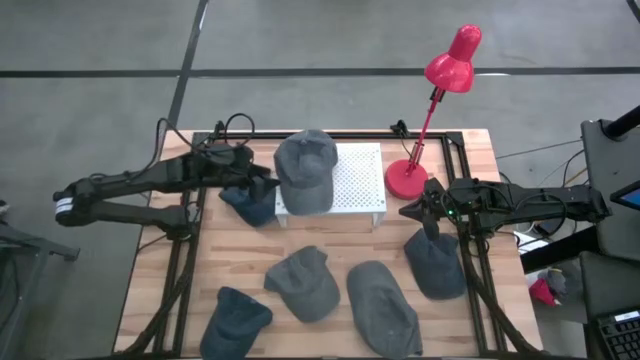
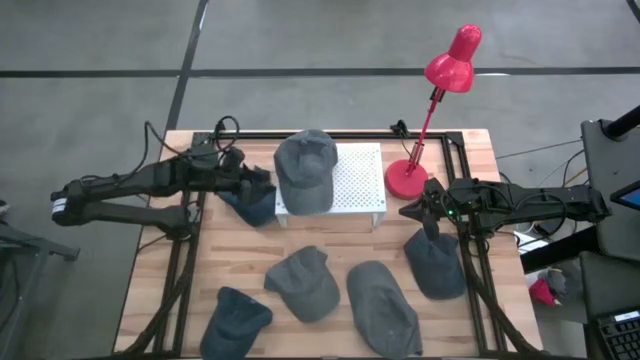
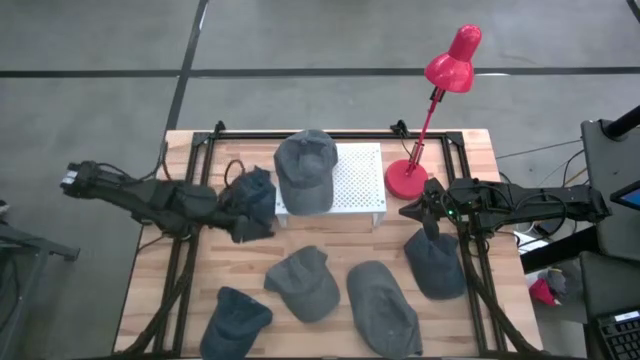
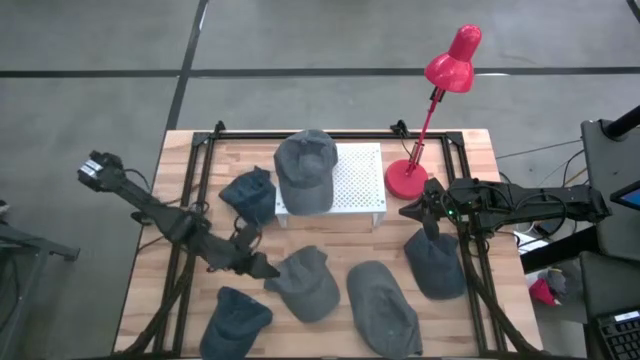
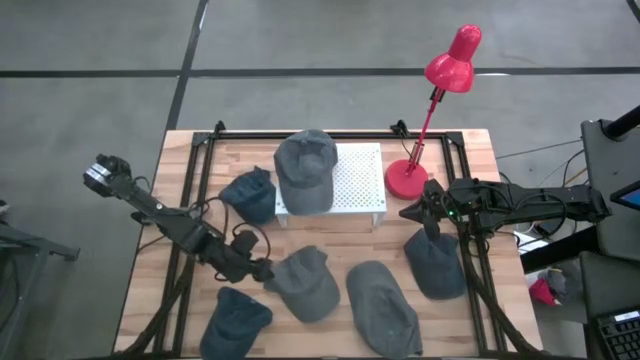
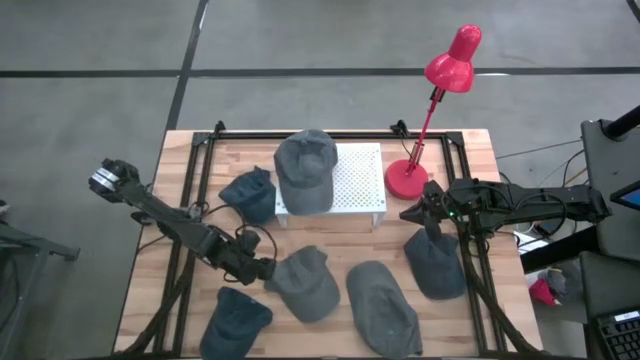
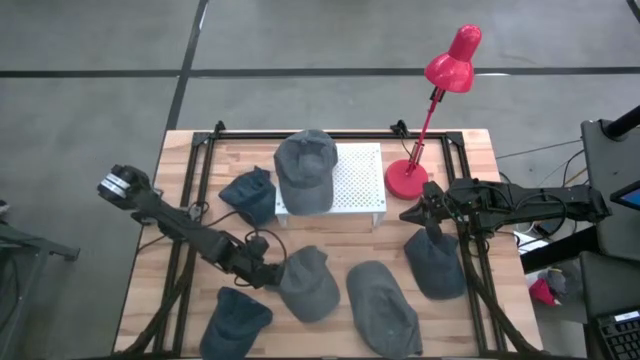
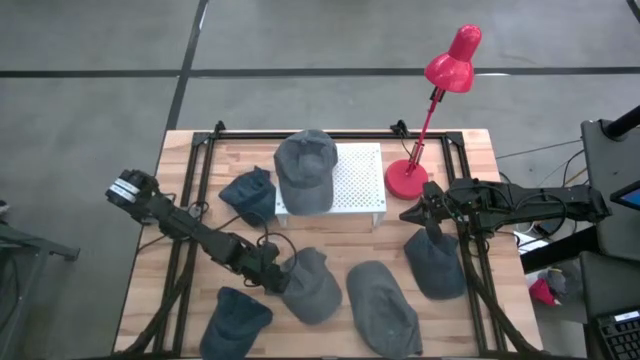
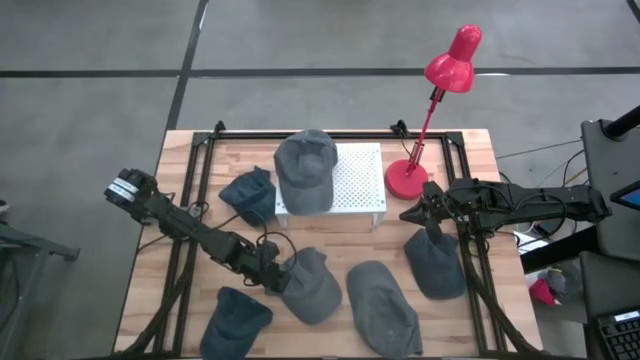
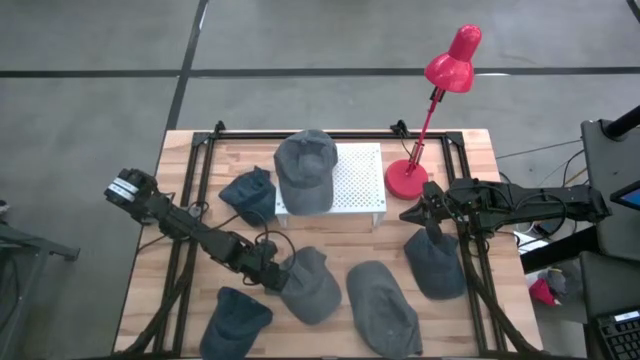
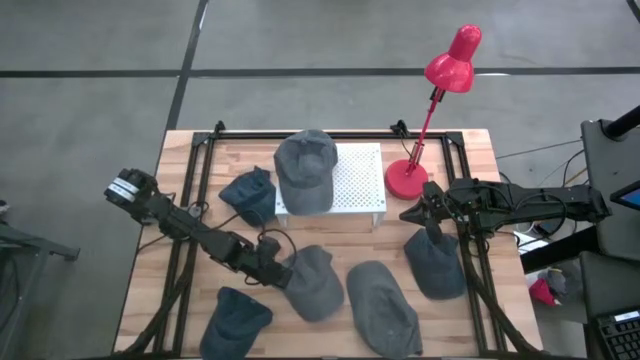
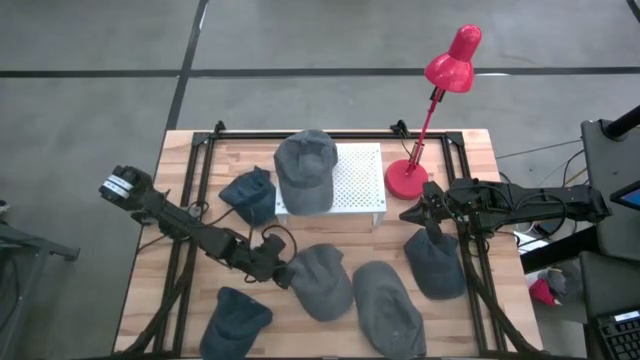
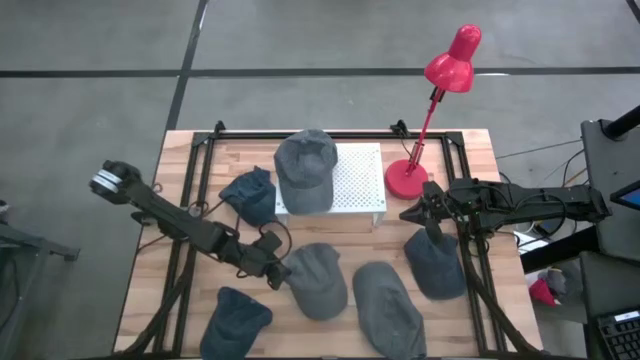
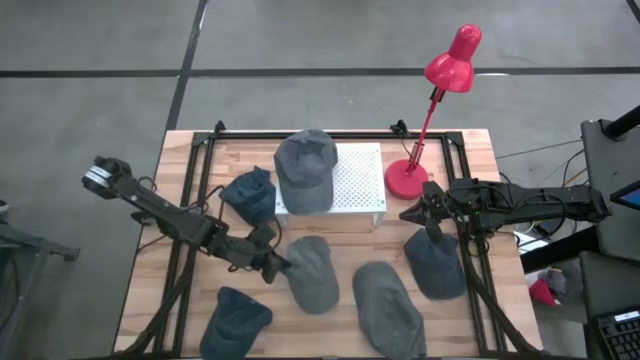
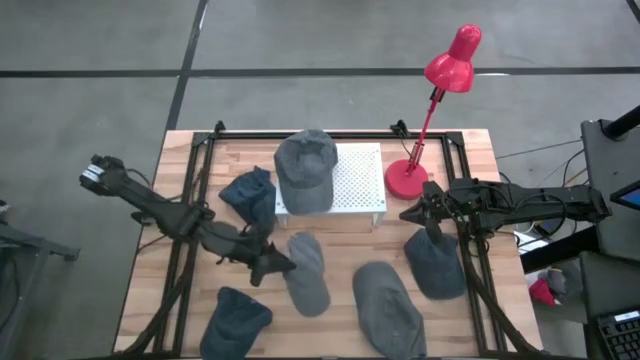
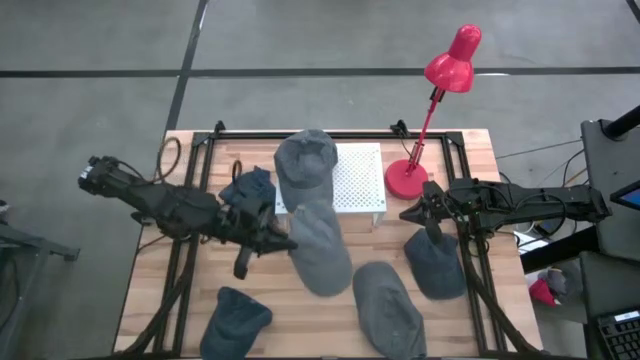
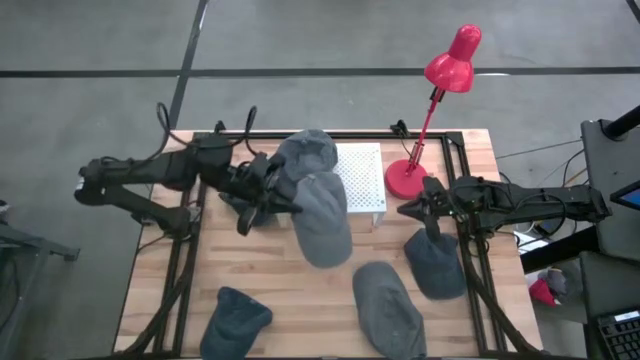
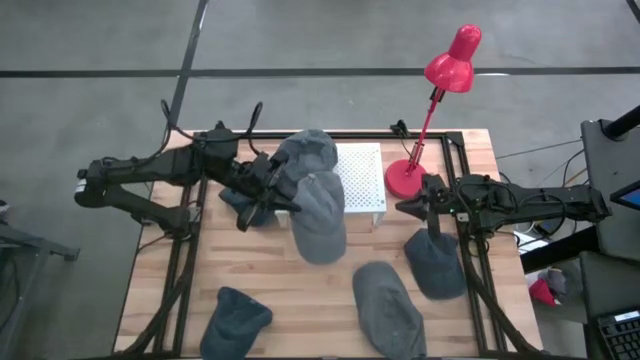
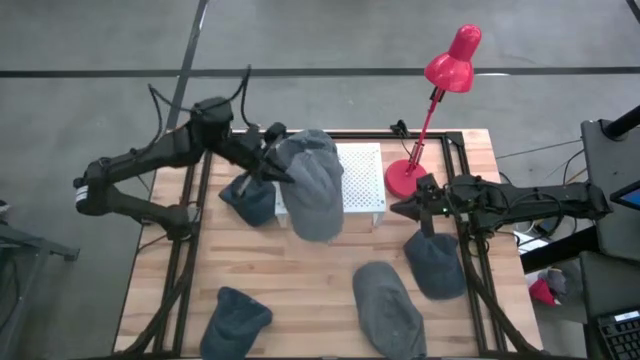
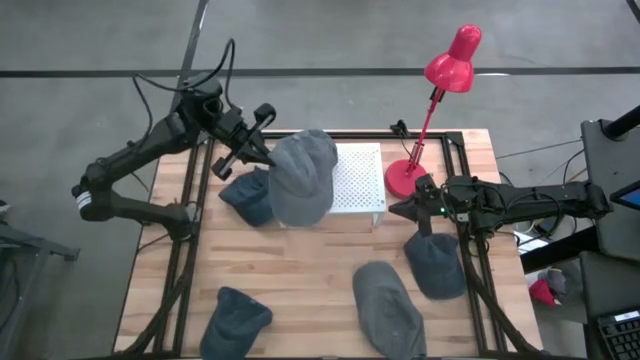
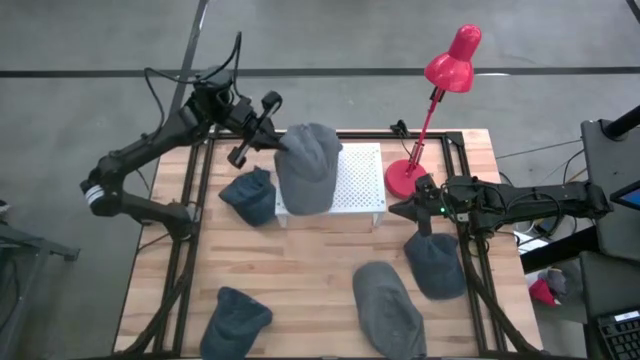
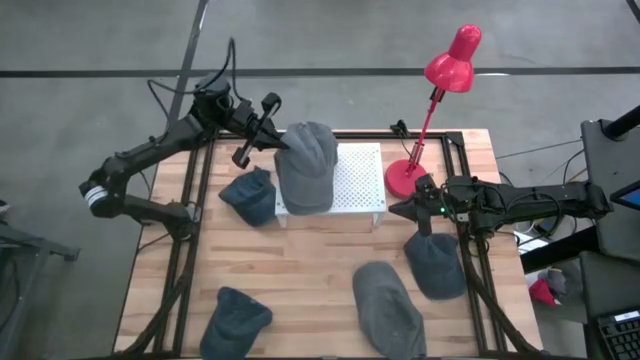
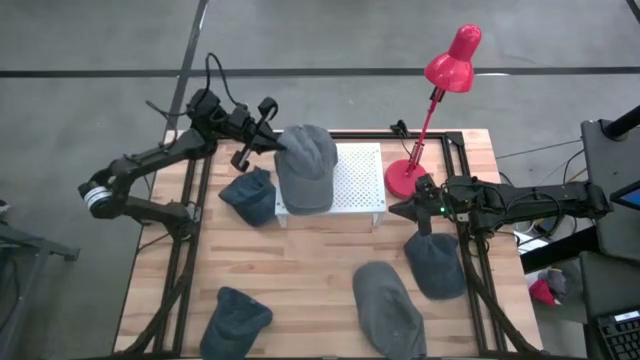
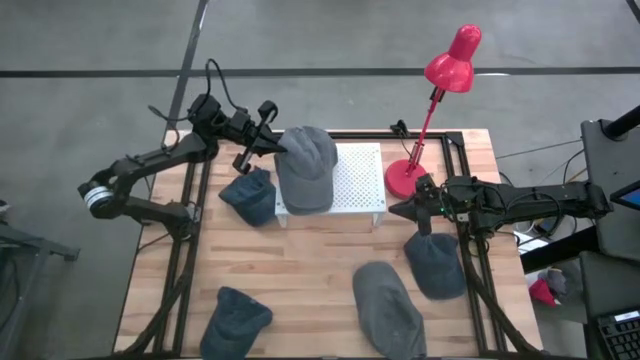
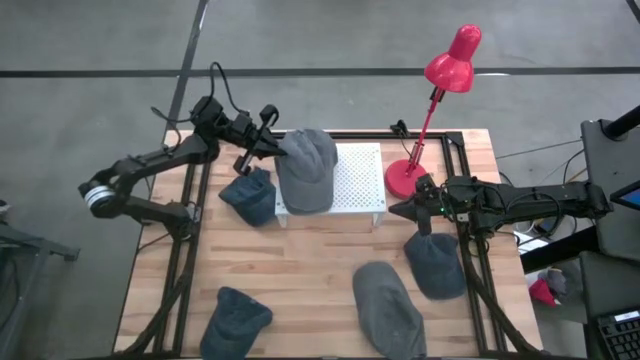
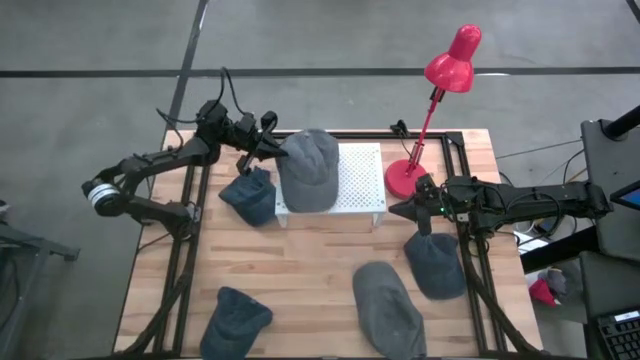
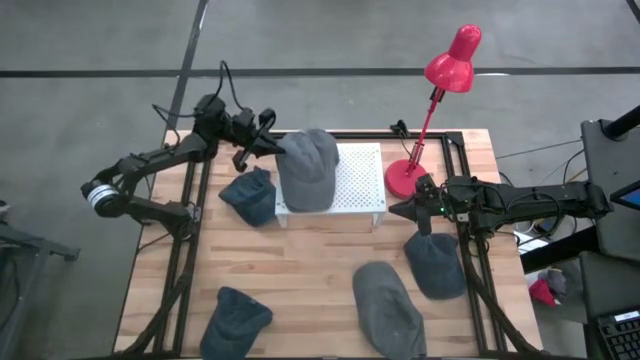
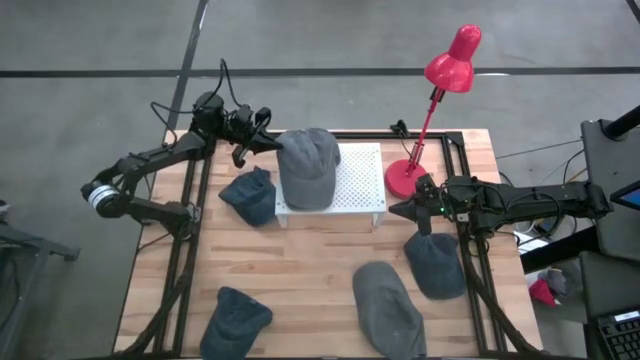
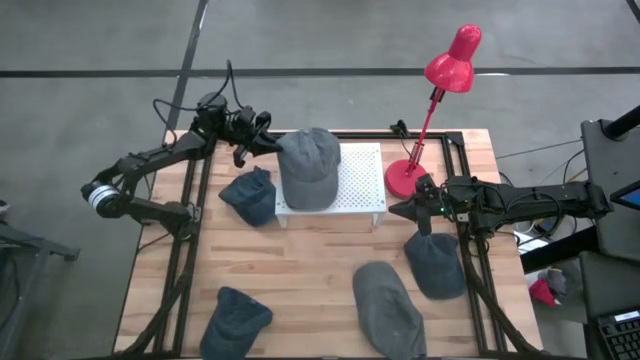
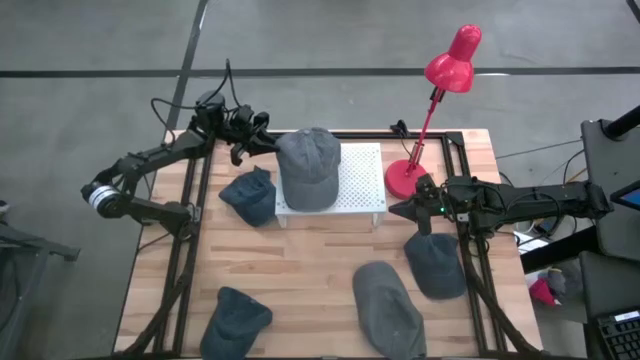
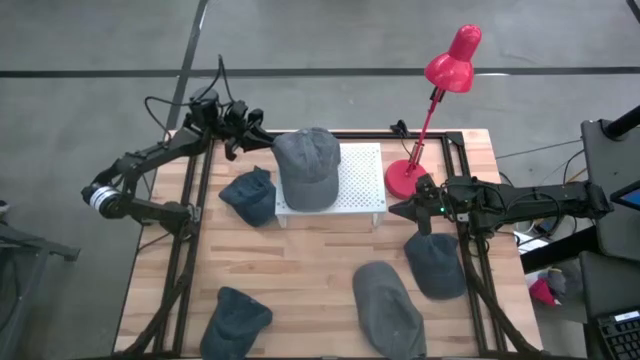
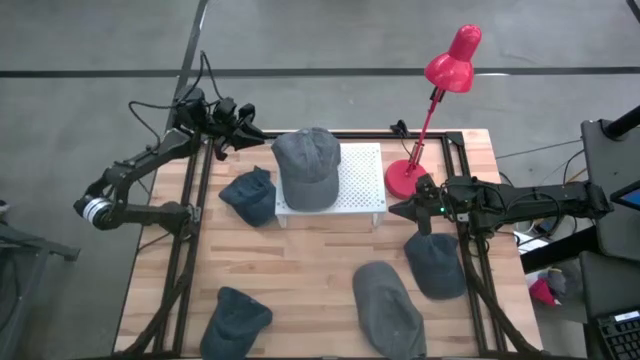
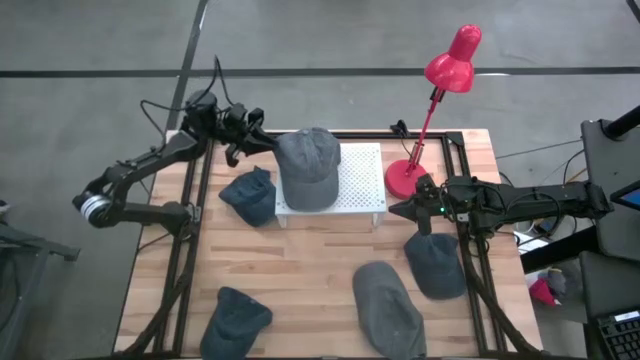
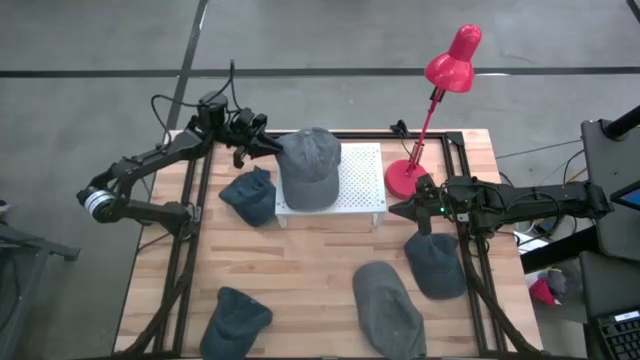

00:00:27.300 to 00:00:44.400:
Task: Pick & Place hat
Stack the left gray cap on the gray cap on the shelf

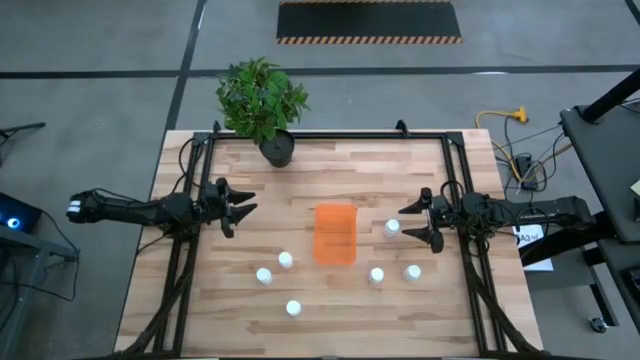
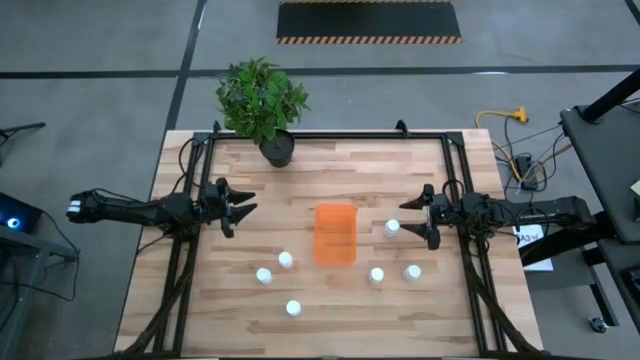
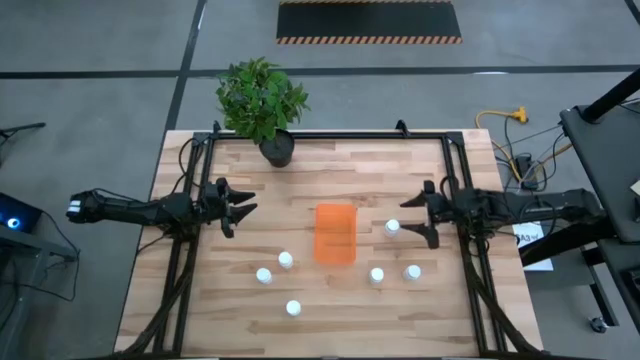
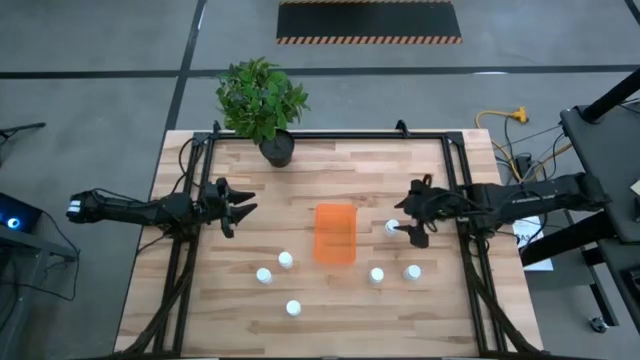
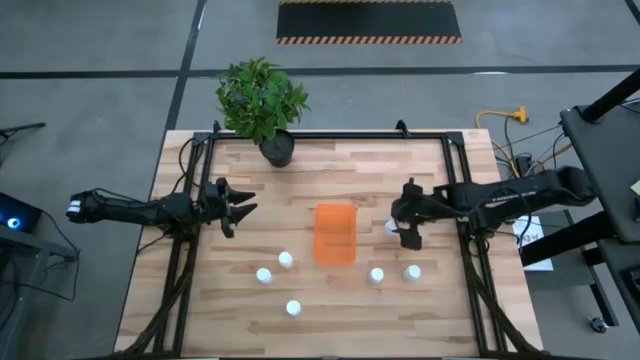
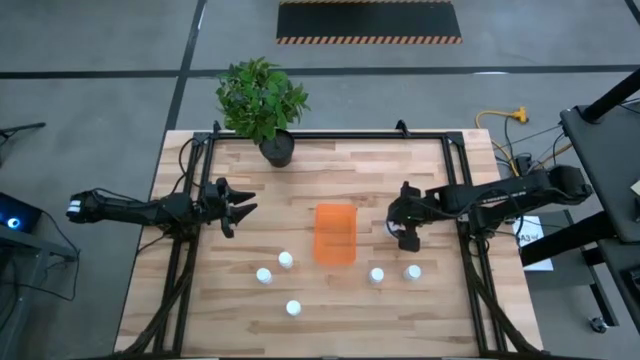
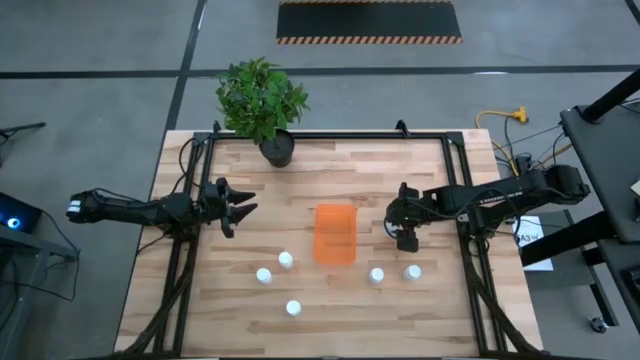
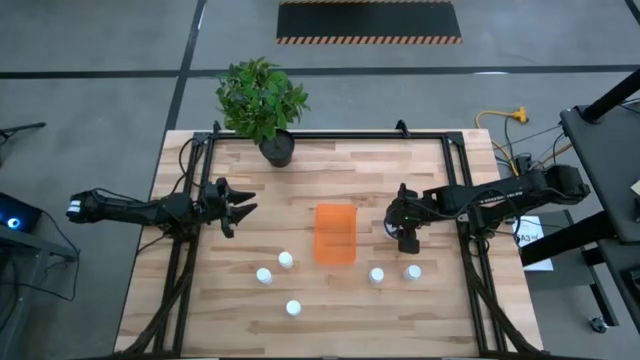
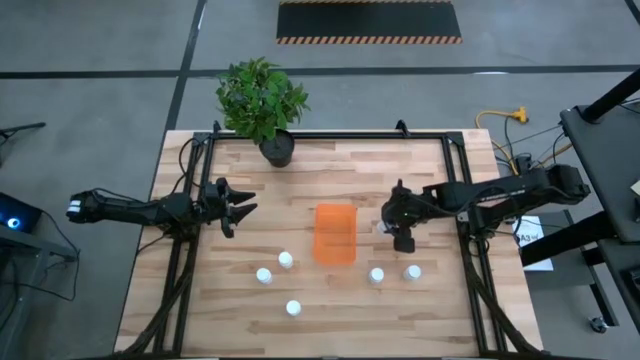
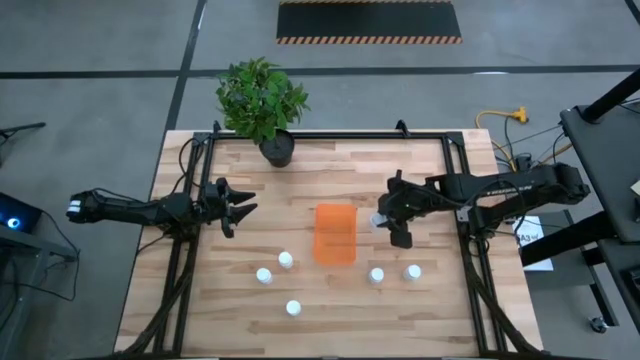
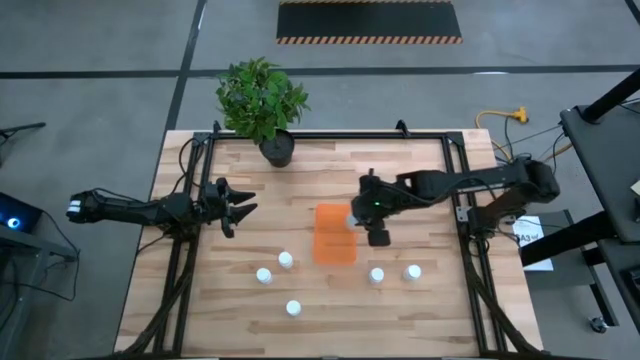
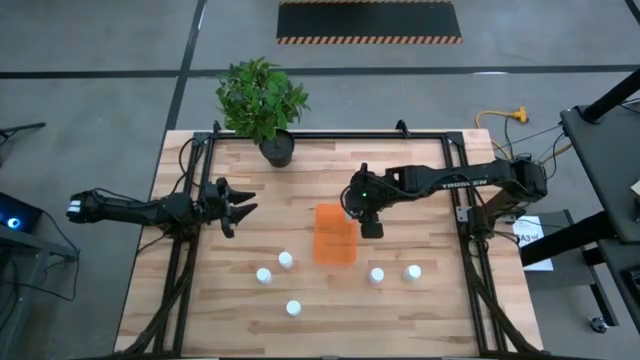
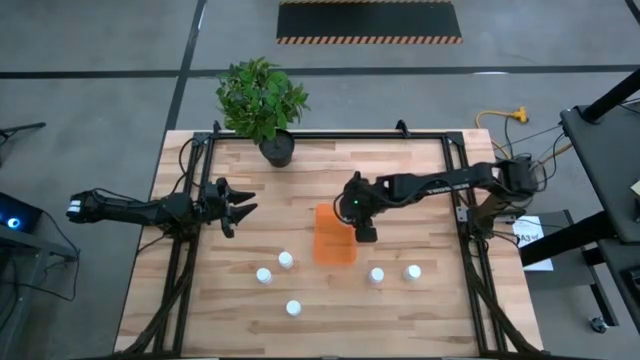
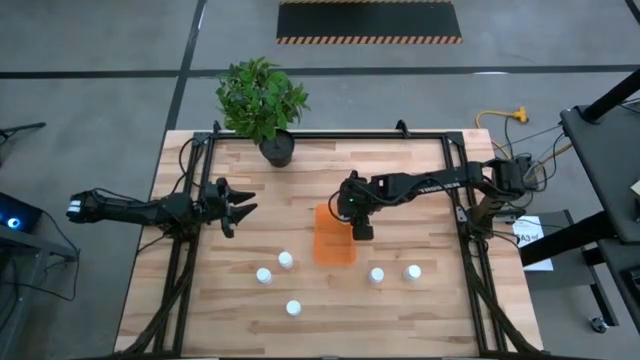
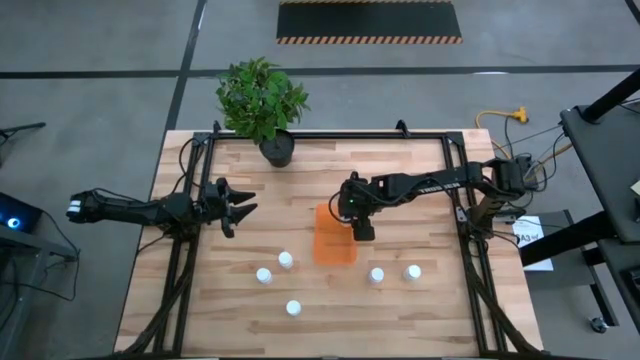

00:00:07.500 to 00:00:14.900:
Task: Pick and place pill bottles into a basket
Put the white pill bottle into the orange bin
